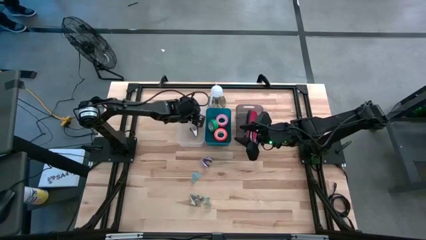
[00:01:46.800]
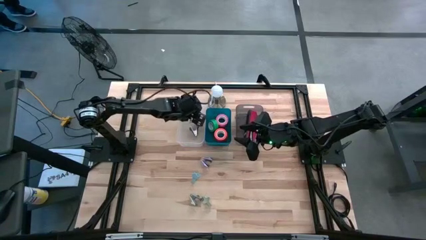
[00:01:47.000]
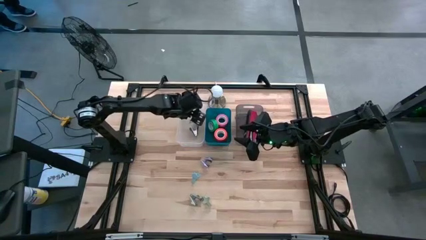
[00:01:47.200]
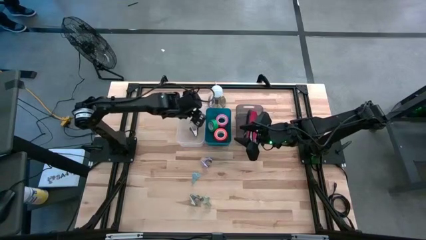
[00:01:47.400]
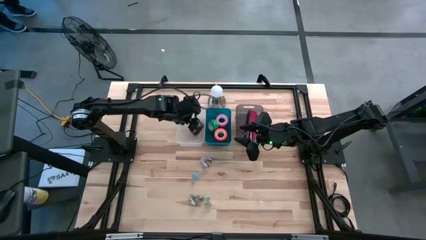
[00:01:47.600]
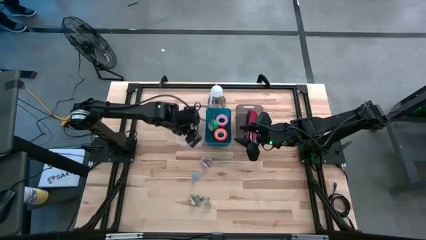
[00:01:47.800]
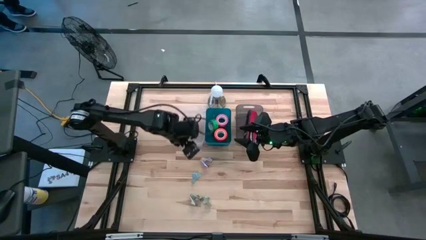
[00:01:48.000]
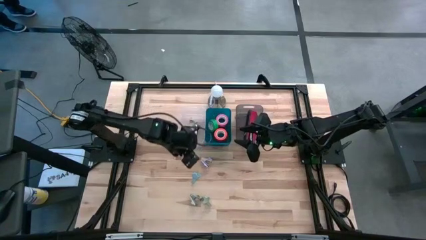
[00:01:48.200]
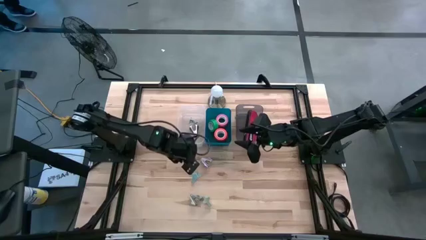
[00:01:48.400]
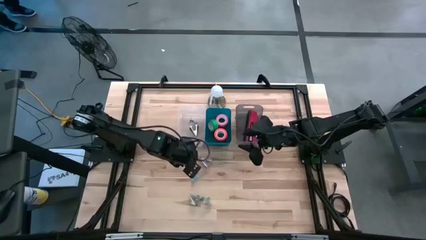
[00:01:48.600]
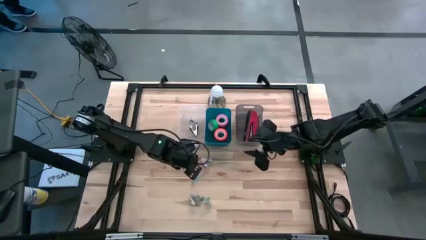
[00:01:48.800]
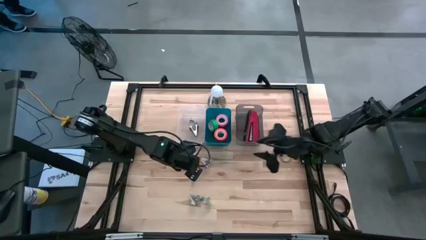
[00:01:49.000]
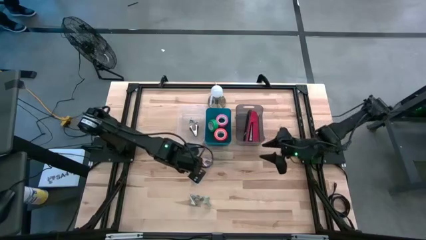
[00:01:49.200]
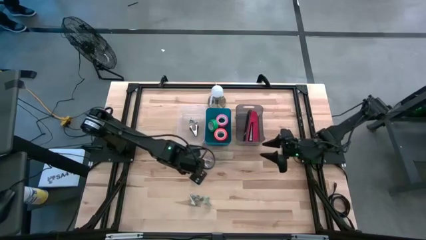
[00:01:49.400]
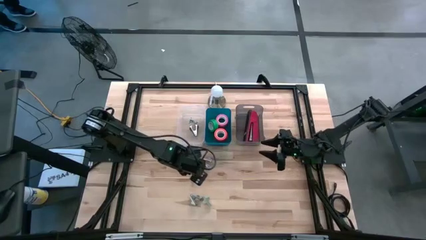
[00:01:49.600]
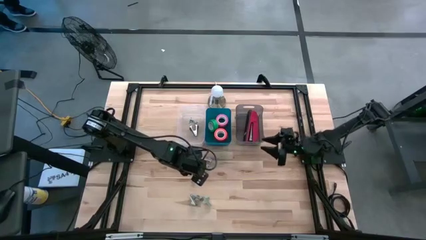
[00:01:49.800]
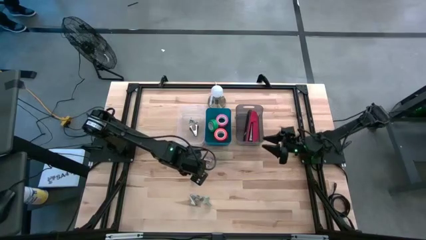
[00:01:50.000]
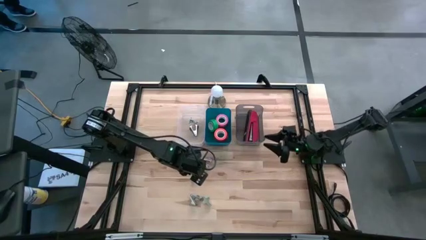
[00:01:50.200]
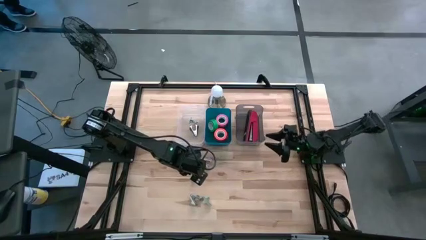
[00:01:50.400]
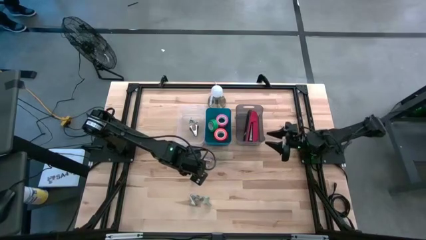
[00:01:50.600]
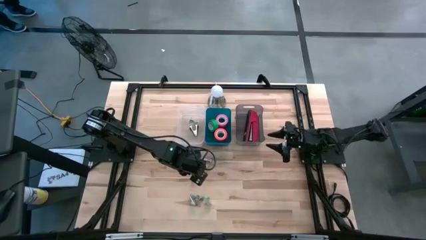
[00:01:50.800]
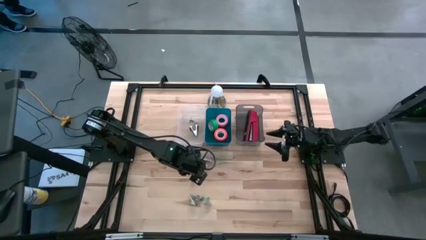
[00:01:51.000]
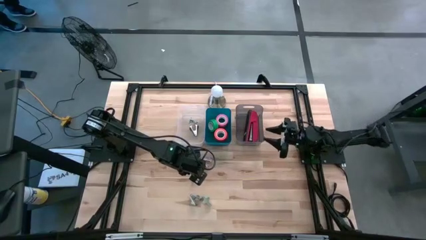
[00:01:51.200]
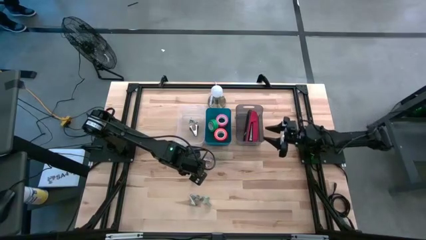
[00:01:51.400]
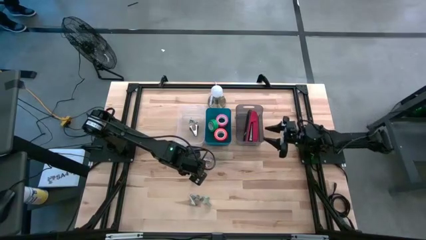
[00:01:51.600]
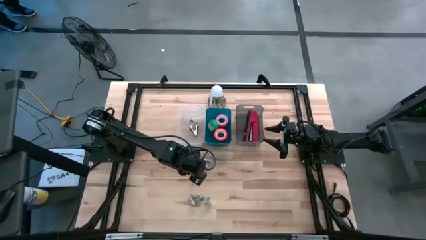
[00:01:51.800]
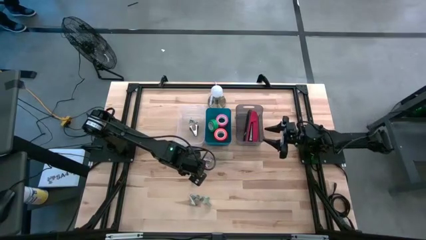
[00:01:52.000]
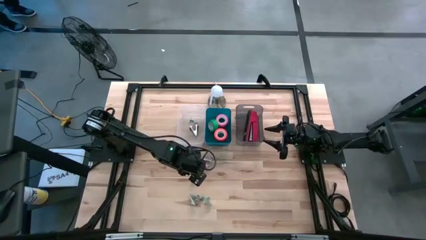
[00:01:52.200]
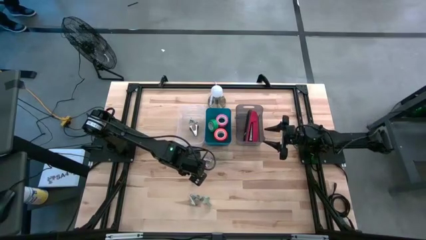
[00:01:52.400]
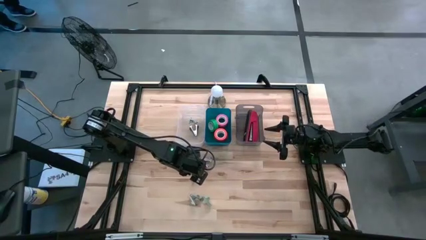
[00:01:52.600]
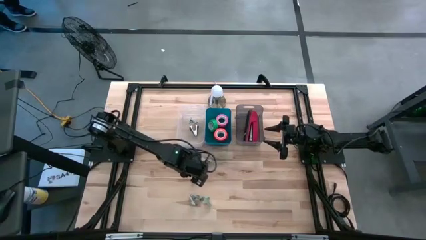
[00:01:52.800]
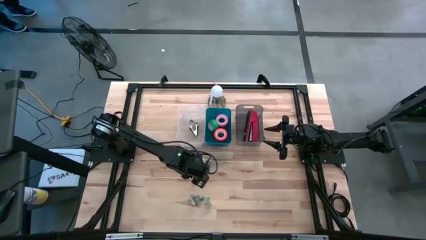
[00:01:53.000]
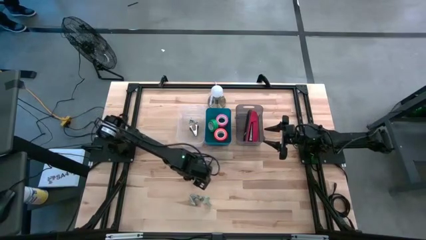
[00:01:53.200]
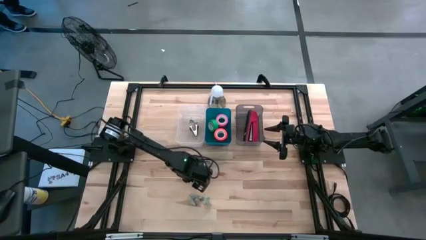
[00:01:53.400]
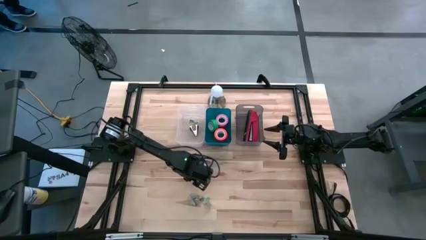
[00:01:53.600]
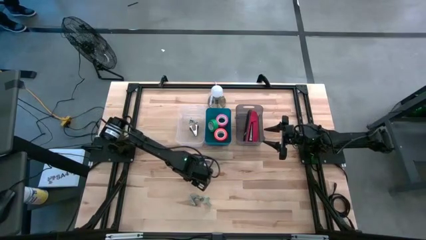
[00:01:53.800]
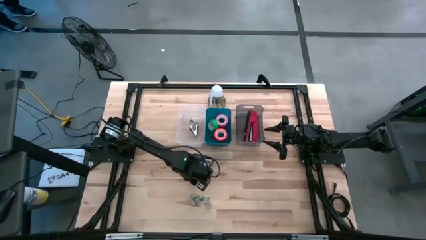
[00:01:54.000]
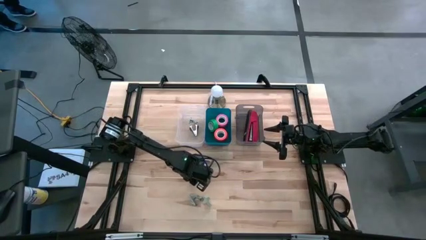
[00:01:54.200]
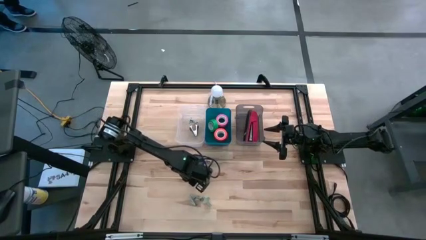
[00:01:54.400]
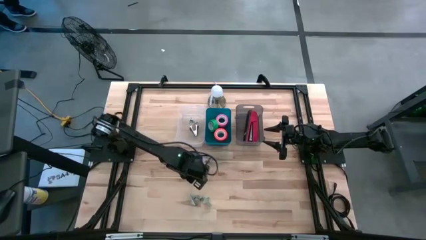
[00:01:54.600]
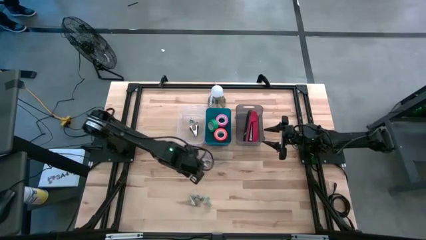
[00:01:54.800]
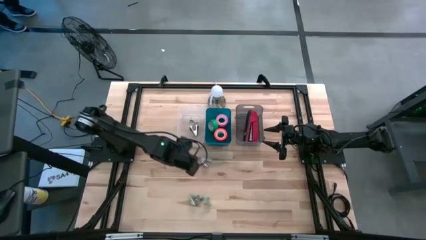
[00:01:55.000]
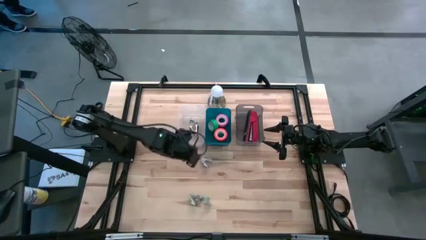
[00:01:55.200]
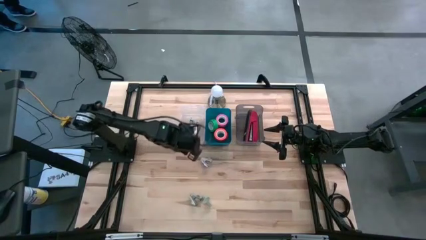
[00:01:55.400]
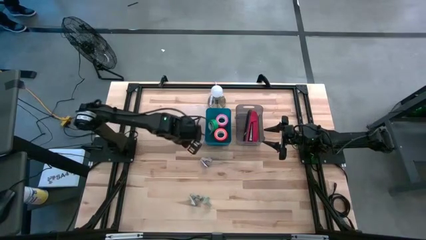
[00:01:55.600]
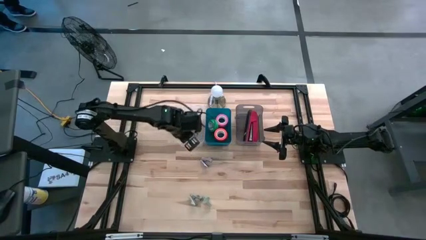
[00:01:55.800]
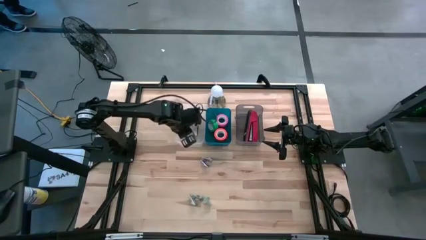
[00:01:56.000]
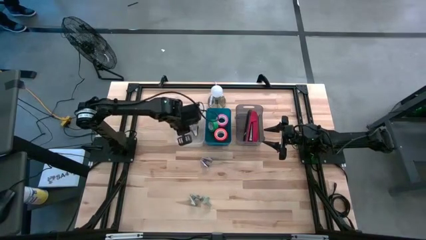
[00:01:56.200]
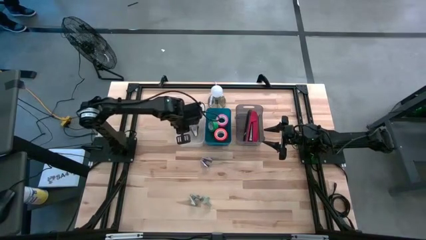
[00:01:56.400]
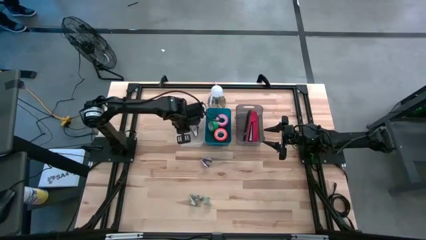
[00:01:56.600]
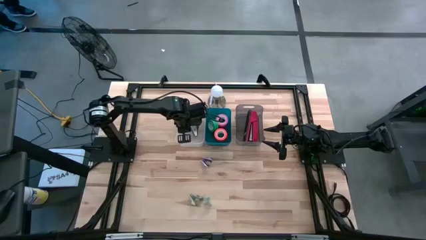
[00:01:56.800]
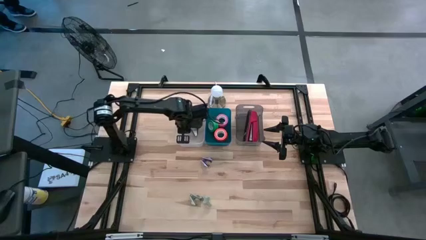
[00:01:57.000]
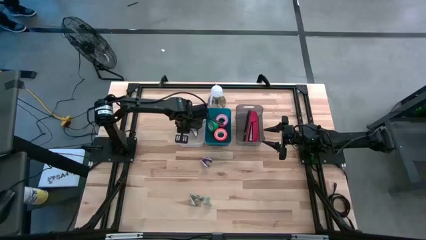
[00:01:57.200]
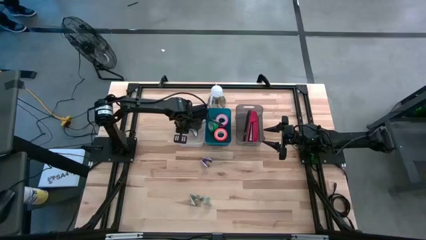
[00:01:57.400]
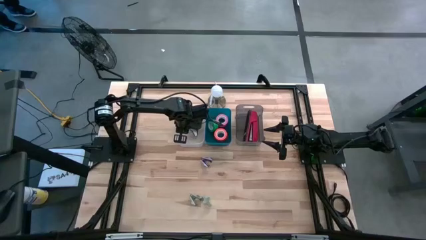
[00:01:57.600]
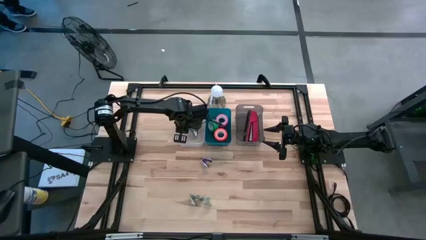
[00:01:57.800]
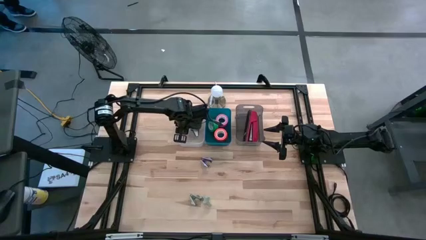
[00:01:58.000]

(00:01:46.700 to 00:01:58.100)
Task: Pick and place Stapler, Stapler remover, tape
Put the blue staple remover into the transparent bin

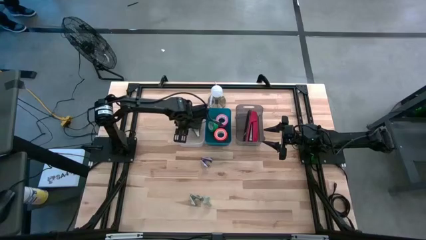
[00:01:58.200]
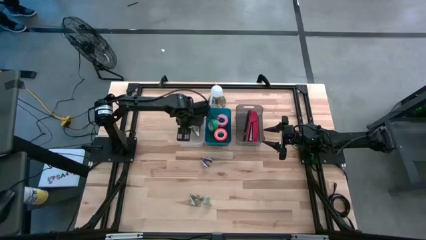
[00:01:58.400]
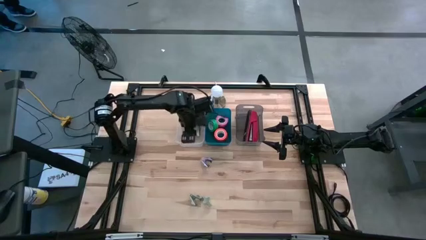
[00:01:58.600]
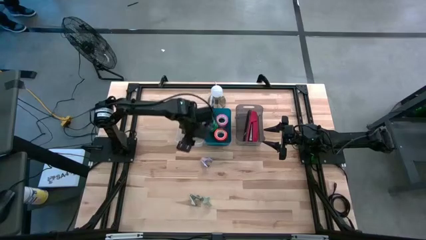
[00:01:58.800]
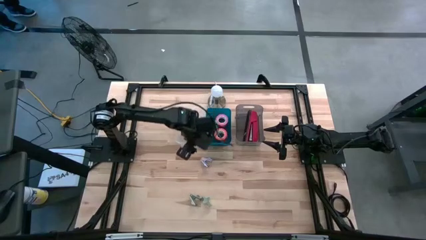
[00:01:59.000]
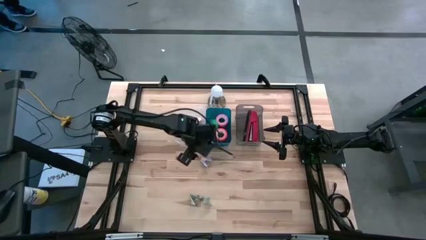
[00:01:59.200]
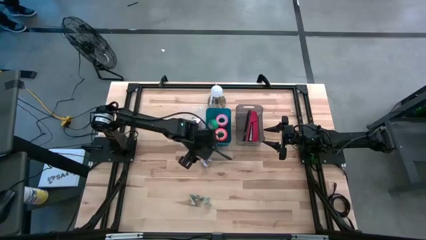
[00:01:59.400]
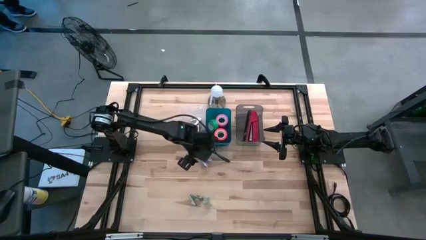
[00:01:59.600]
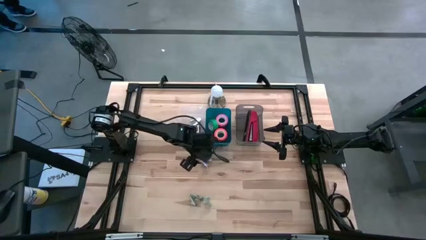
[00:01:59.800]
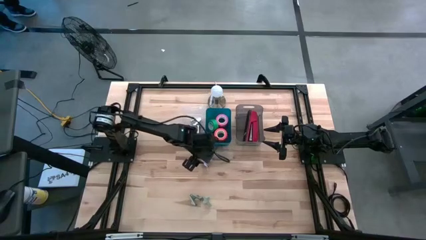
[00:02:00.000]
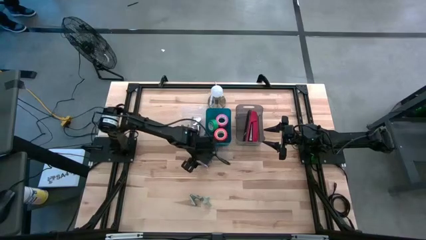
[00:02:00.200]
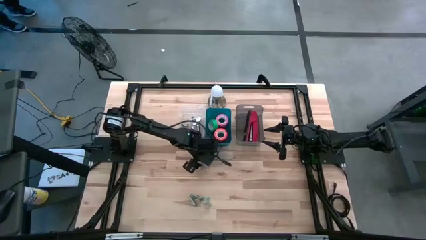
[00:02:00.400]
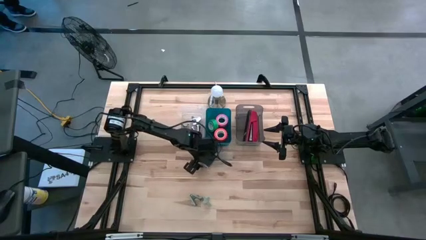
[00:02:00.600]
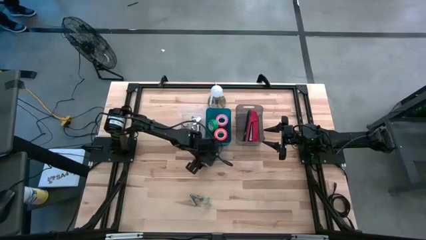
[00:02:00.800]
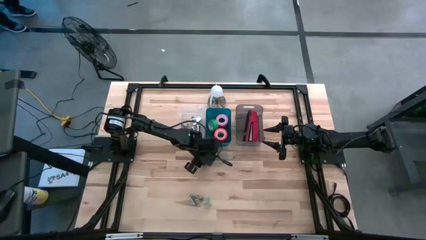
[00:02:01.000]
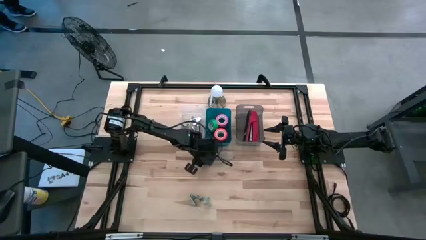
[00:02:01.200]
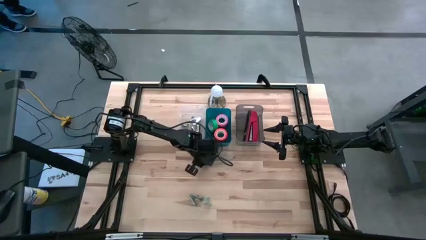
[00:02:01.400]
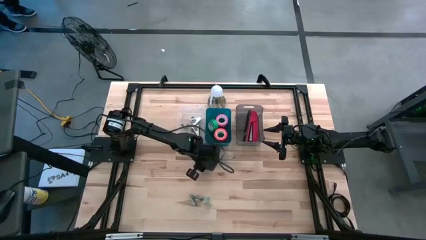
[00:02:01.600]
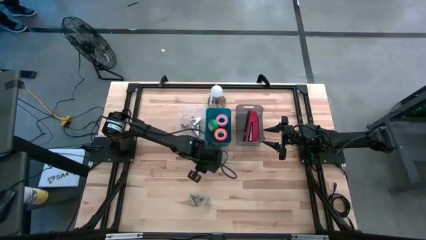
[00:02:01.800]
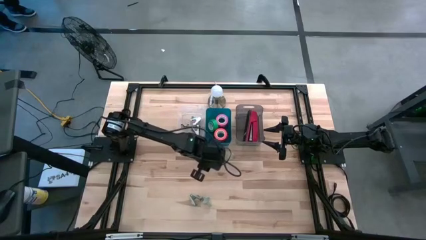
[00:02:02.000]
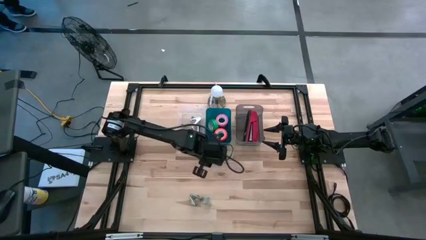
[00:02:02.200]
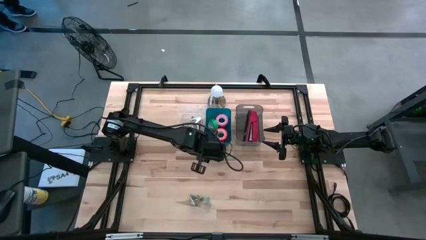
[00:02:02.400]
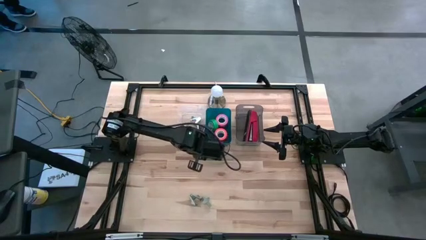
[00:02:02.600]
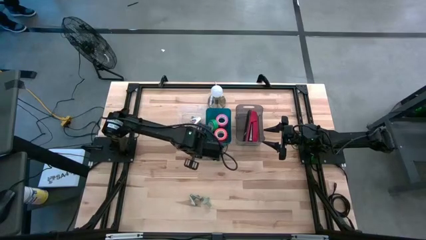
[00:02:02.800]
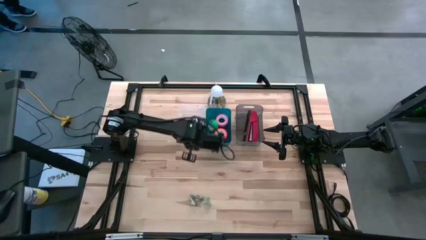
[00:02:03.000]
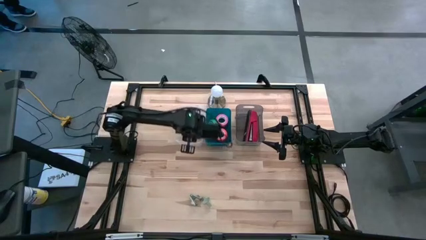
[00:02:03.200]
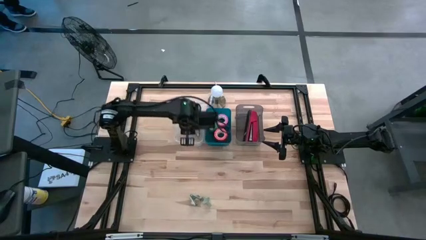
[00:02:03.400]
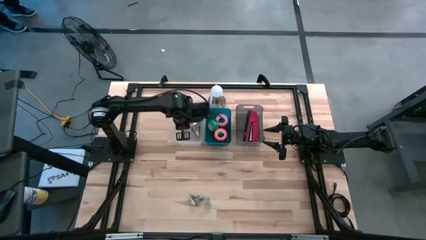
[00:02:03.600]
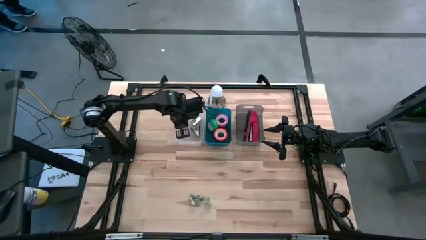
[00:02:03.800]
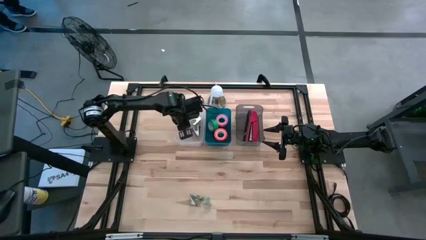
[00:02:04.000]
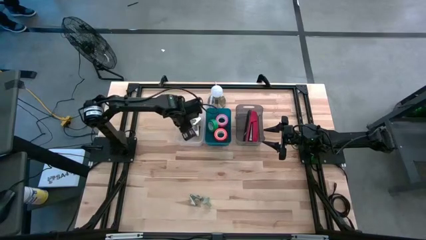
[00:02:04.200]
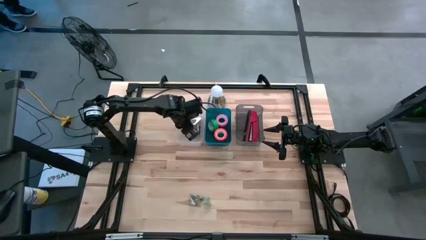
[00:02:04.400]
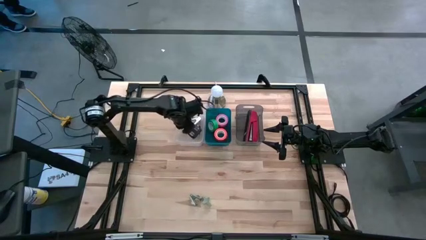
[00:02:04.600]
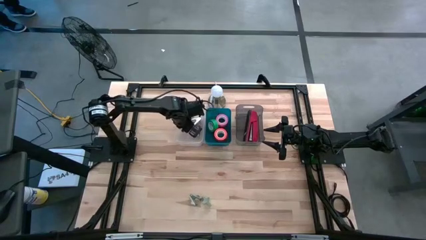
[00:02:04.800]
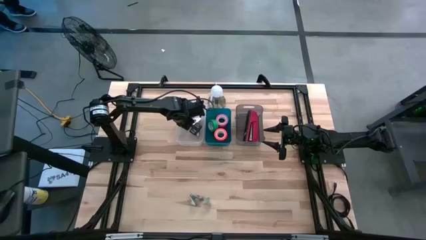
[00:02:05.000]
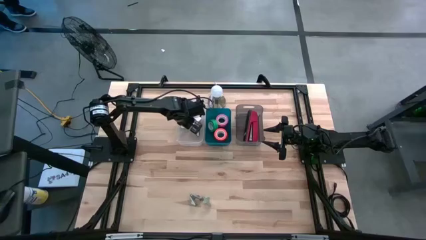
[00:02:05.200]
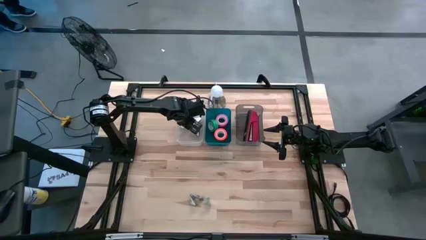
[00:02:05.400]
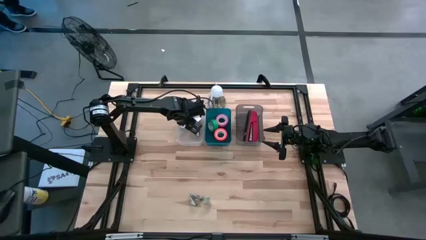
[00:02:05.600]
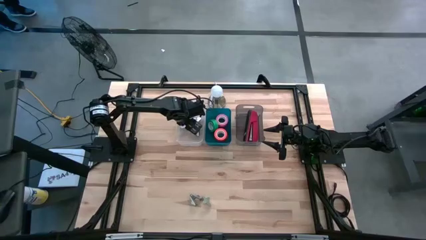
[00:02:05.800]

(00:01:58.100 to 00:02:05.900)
Put the purple staple remover into the transparent bin
